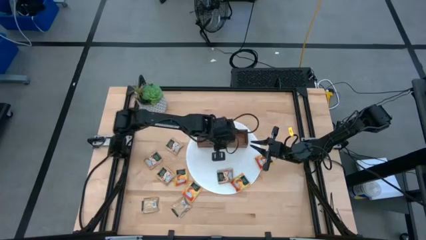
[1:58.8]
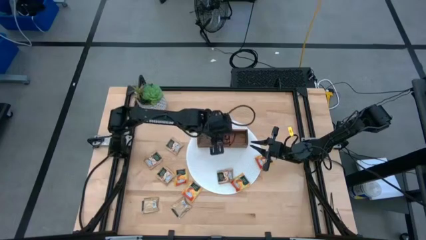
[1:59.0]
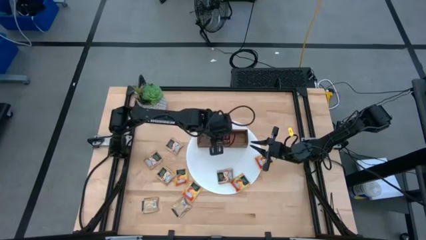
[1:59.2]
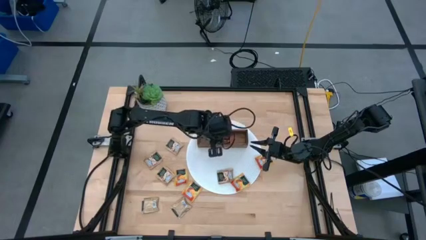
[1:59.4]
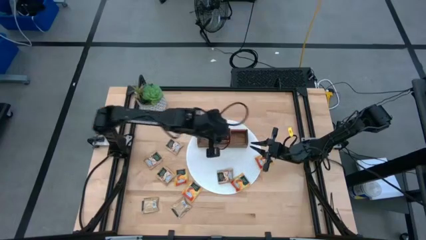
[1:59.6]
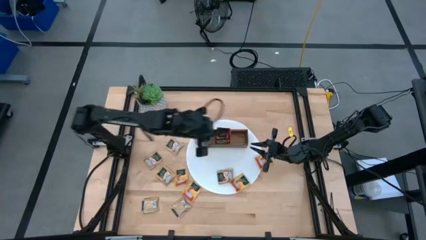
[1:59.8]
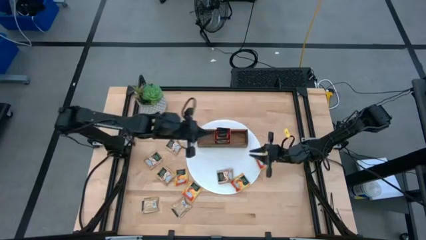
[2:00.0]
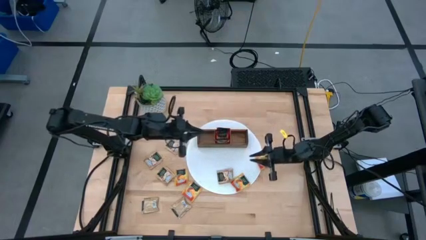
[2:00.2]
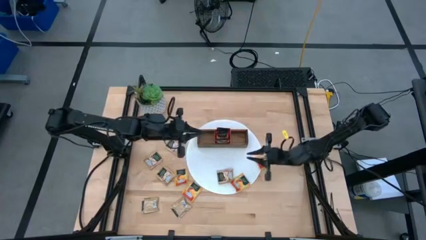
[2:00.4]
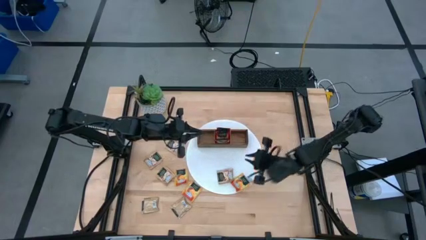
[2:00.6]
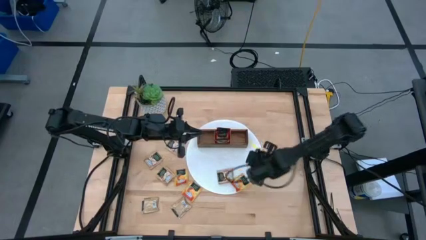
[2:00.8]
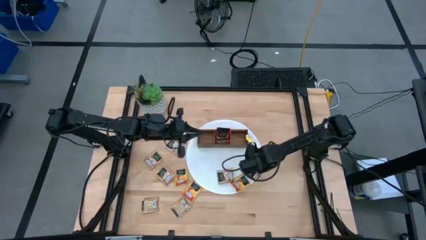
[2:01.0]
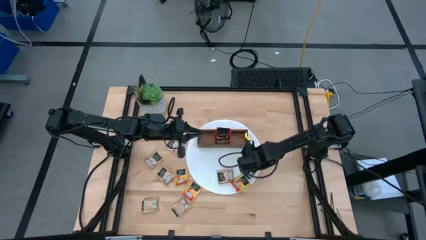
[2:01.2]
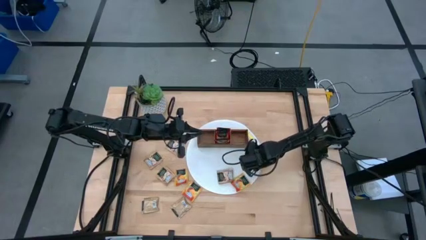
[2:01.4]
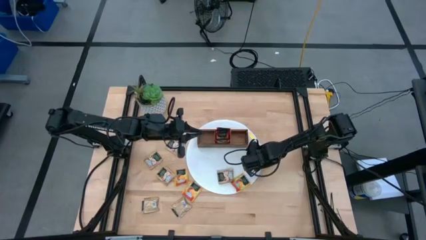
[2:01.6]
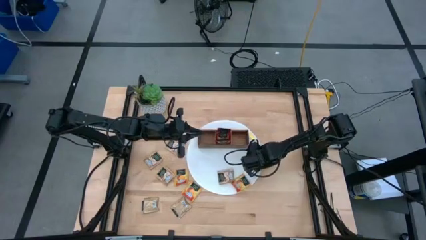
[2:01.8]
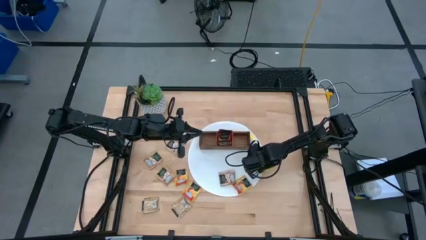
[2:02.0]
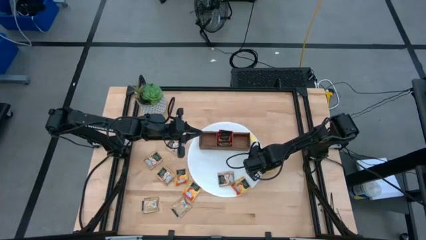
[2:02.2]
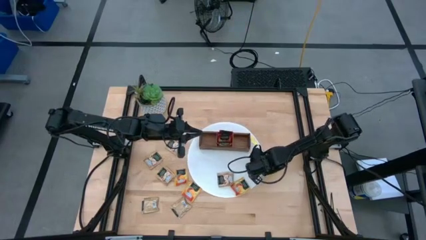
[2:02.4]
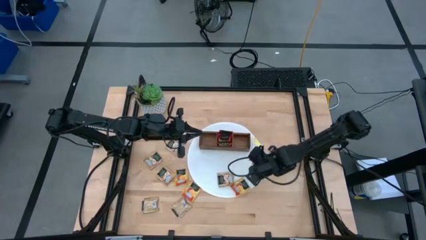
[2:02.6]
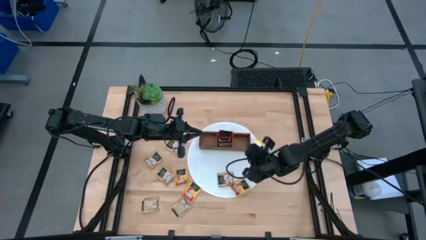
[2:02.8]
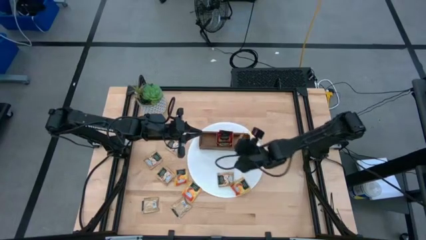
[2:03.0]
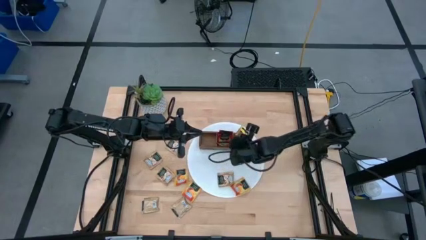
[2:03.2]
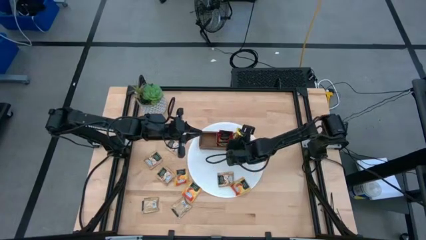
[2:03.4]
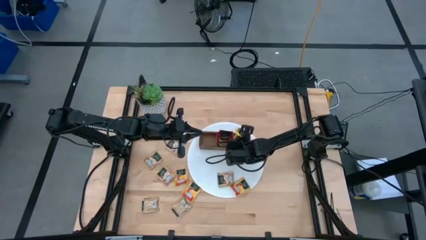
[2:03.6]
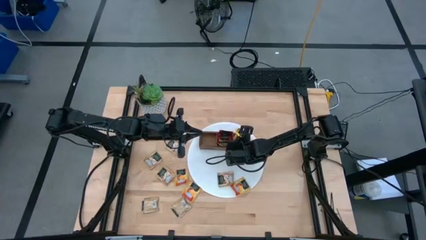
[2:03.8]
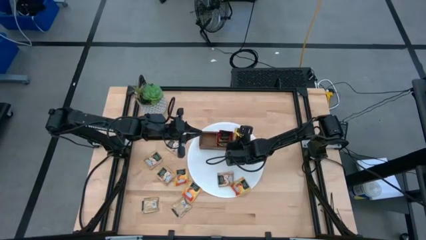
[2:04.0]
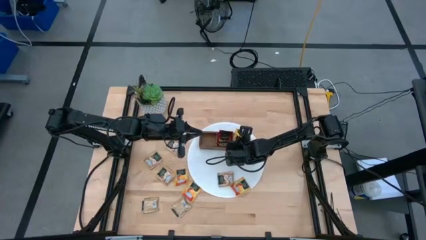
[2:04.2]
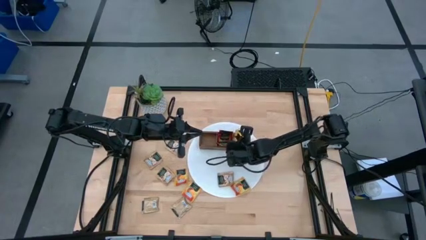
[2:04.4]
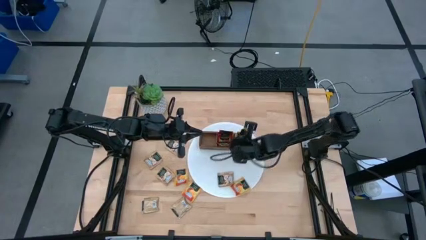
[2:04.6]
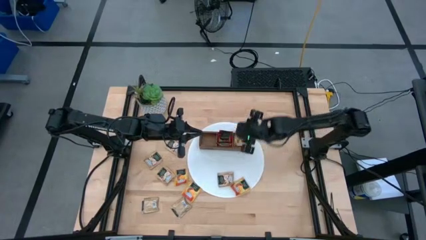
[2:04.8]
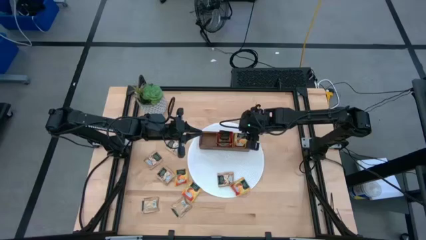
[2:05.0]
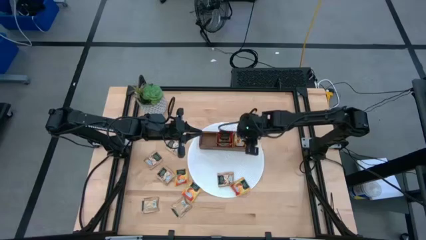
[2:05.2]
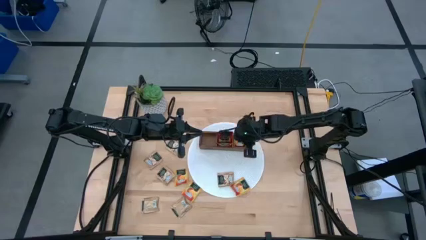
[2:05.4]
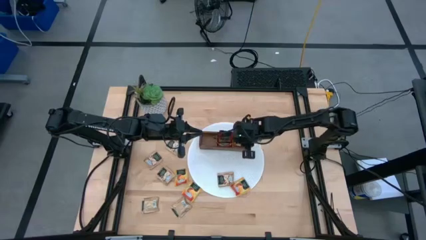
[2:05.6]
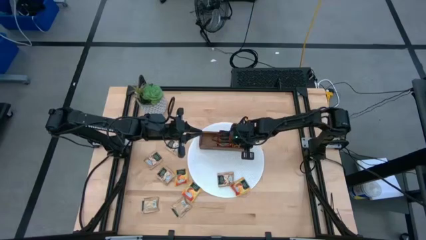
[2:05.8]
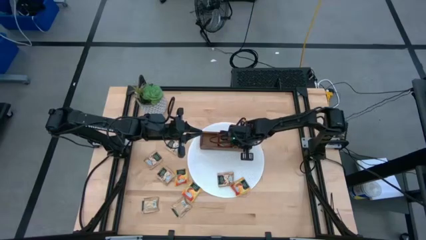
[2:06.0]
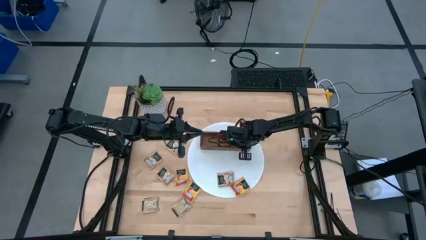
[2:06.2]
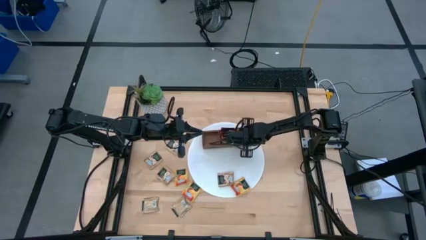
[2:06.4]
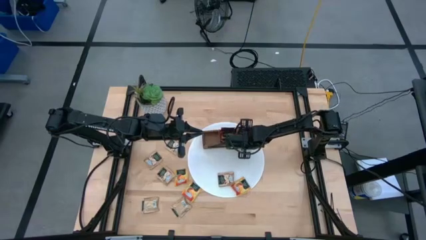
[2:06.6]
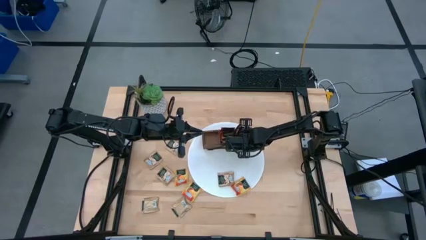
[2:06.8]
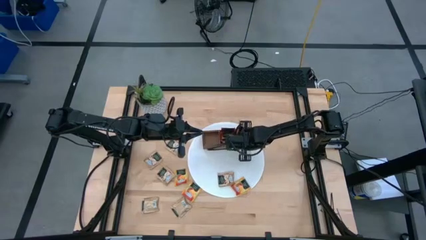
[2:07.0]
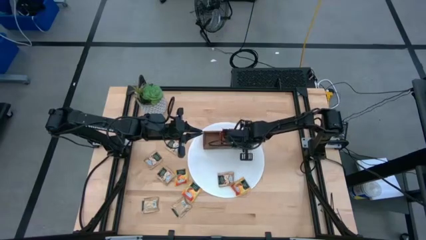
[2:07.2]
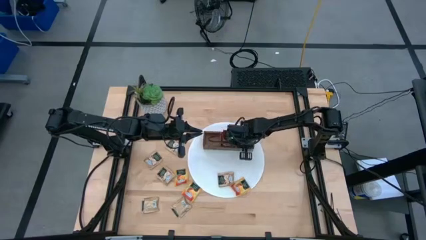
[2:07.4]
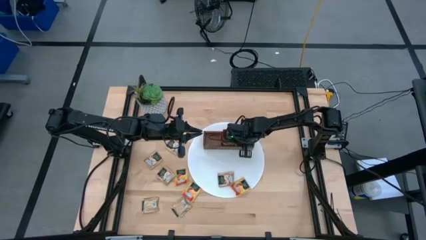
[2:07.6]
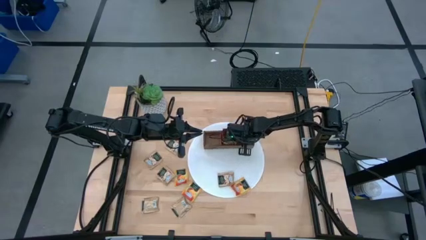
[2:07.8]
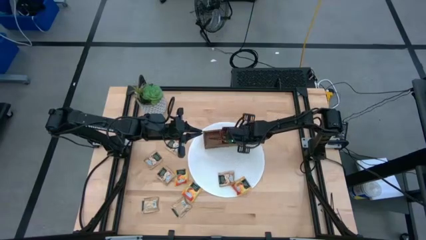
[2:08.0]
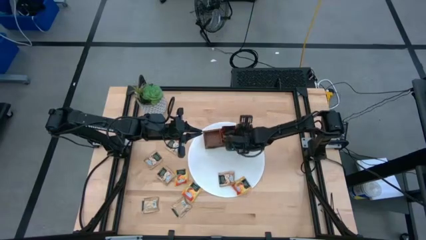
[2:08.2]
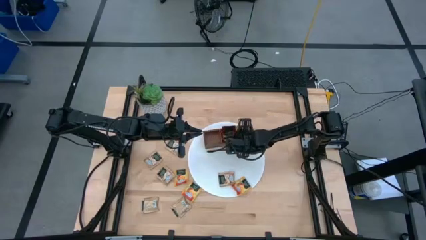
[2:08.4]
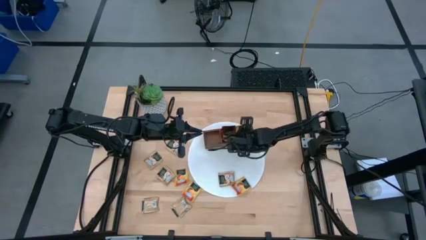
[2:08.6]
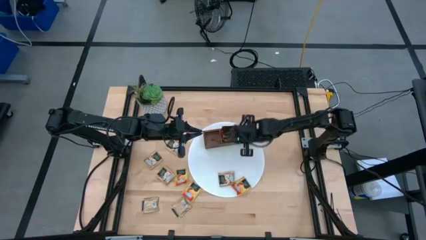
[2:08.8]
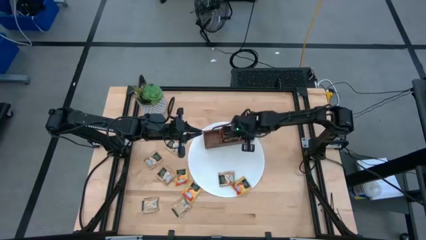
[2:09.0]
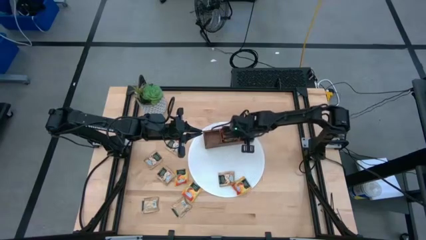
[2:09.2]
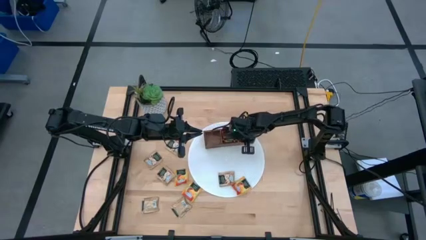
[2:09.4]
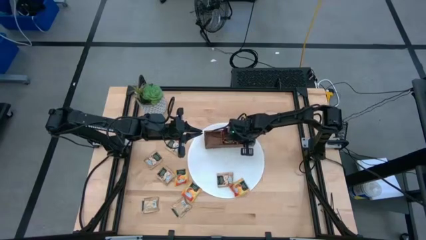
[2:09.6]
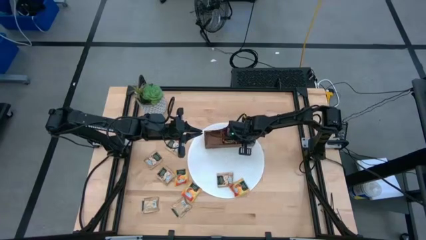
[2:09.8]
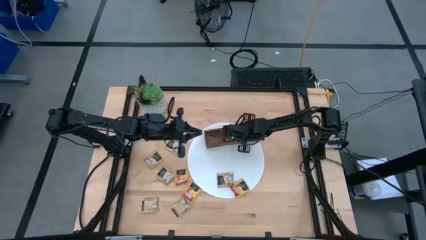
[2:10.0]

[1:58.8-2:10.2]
Task: Pick & Place Tea
Put the yellow tea bag into the right section of the wooden organizer
